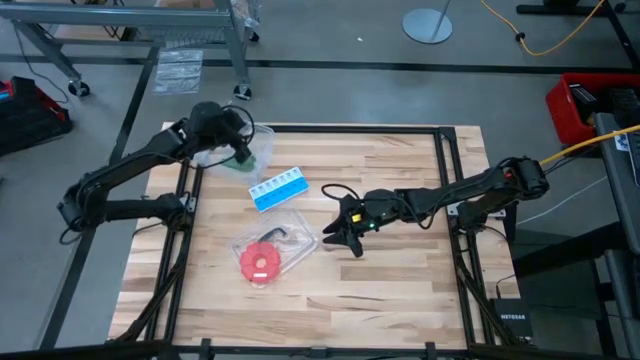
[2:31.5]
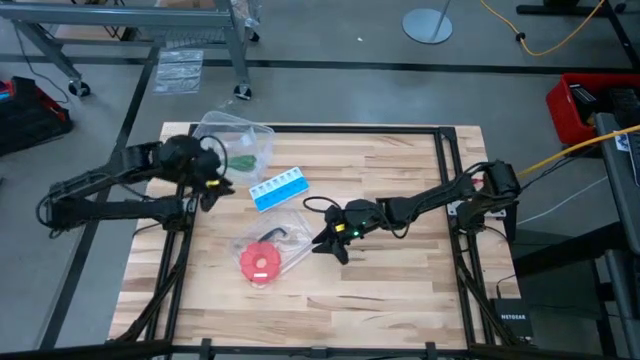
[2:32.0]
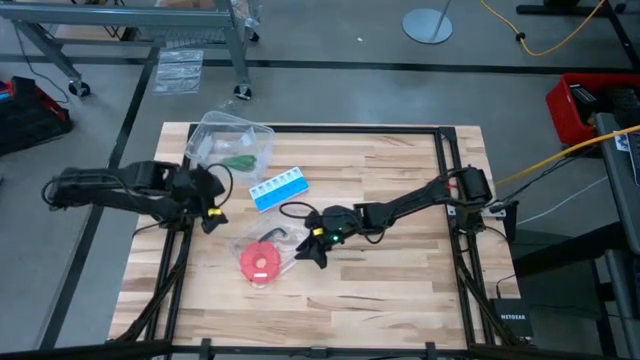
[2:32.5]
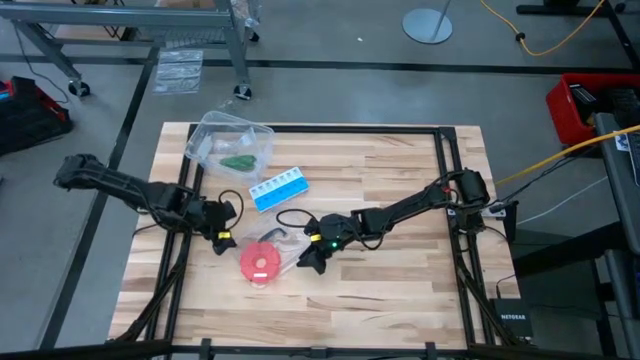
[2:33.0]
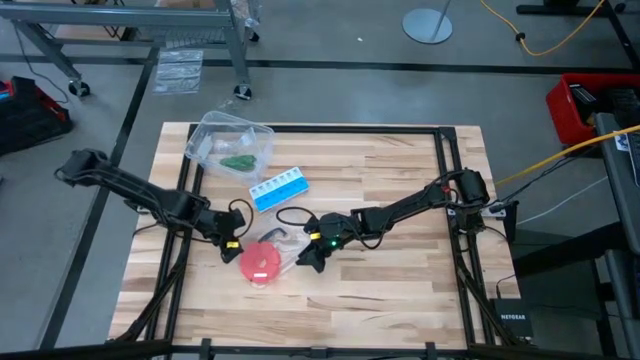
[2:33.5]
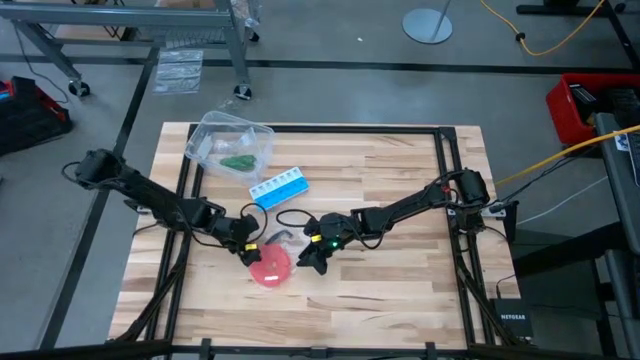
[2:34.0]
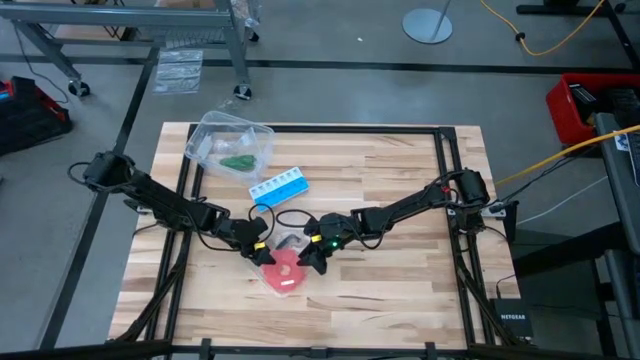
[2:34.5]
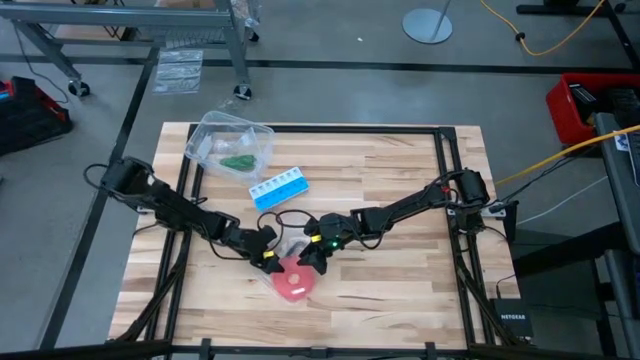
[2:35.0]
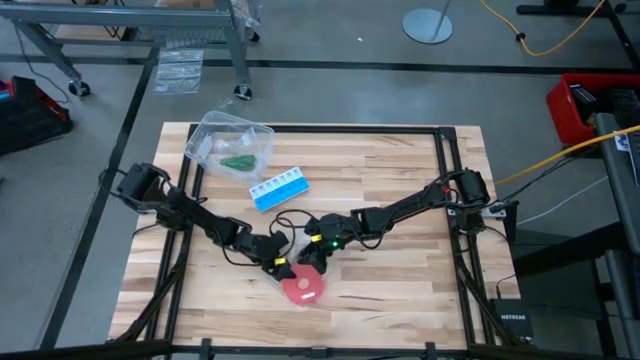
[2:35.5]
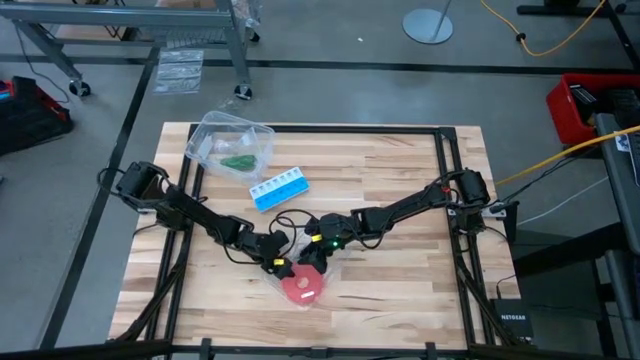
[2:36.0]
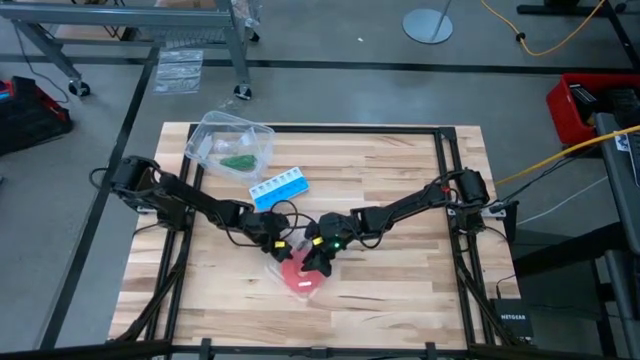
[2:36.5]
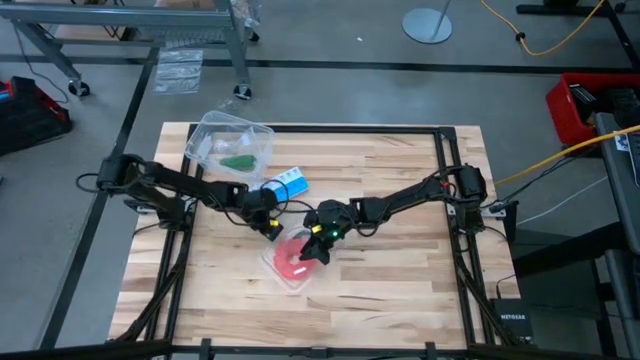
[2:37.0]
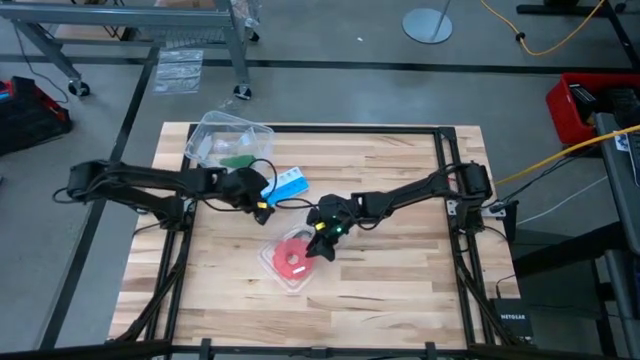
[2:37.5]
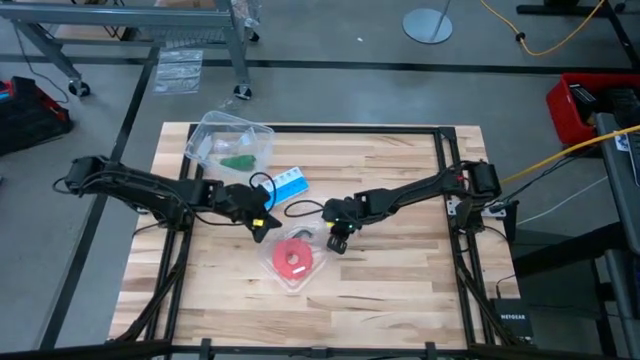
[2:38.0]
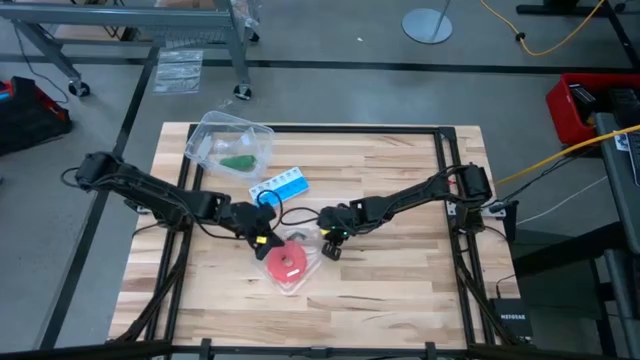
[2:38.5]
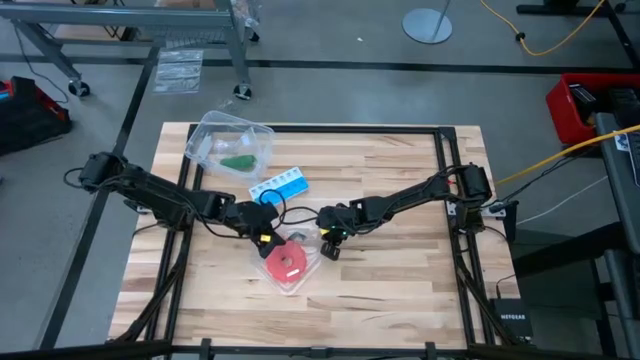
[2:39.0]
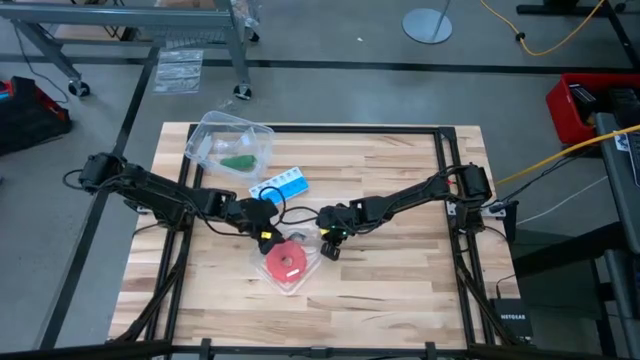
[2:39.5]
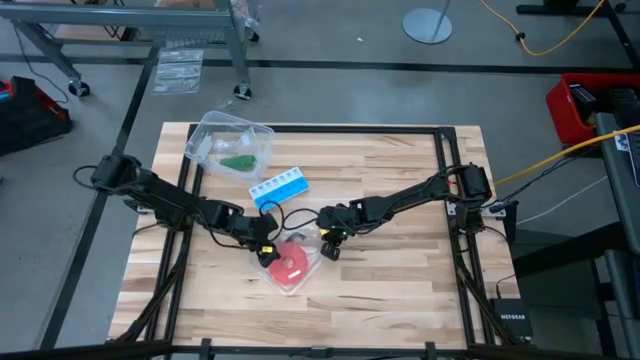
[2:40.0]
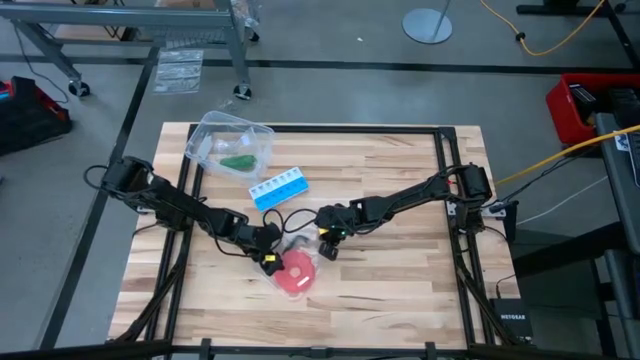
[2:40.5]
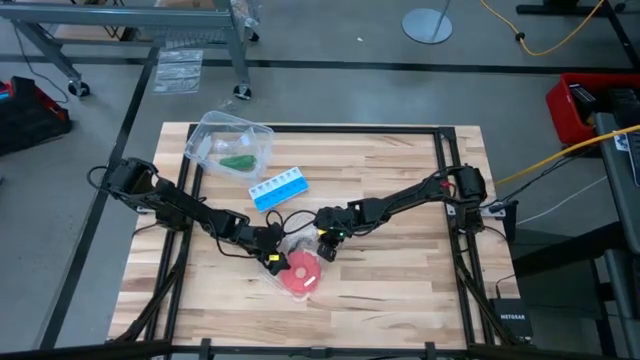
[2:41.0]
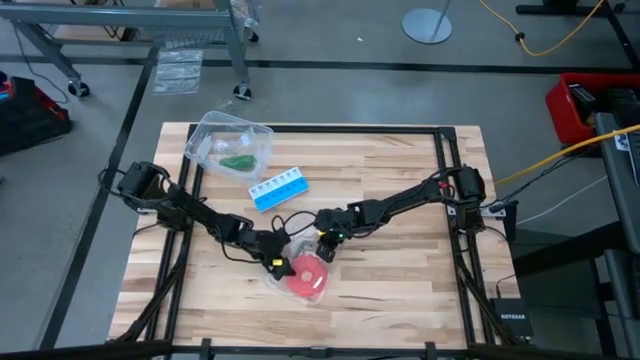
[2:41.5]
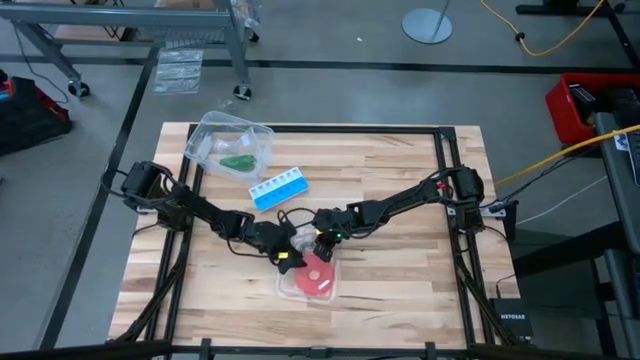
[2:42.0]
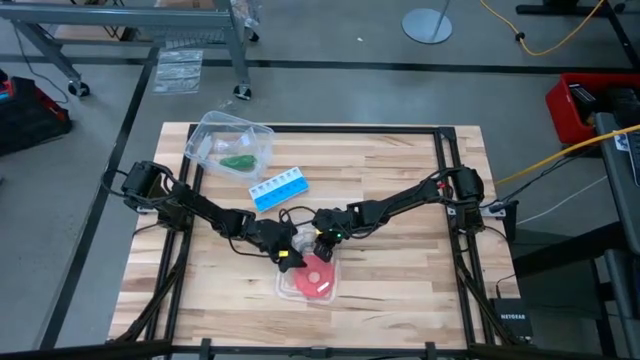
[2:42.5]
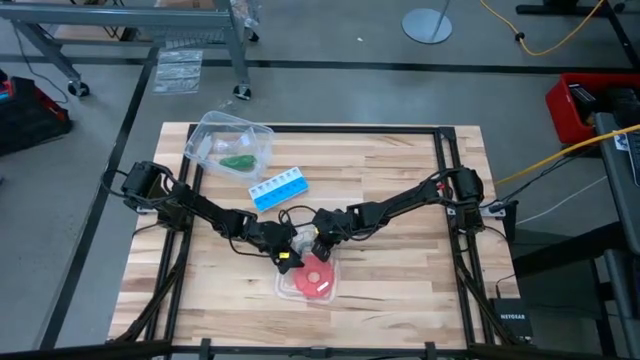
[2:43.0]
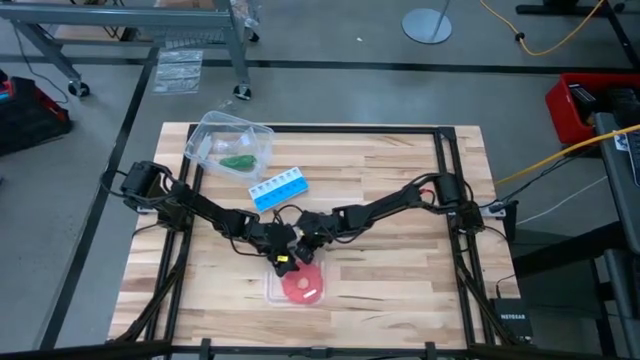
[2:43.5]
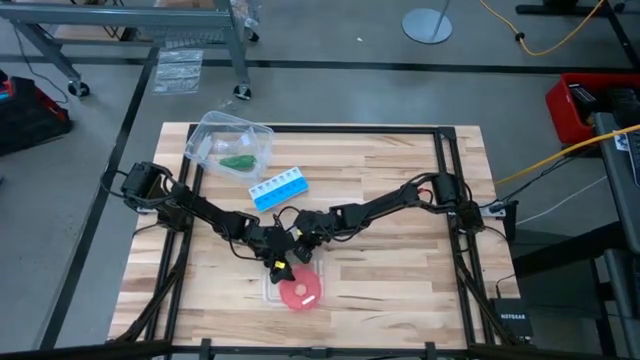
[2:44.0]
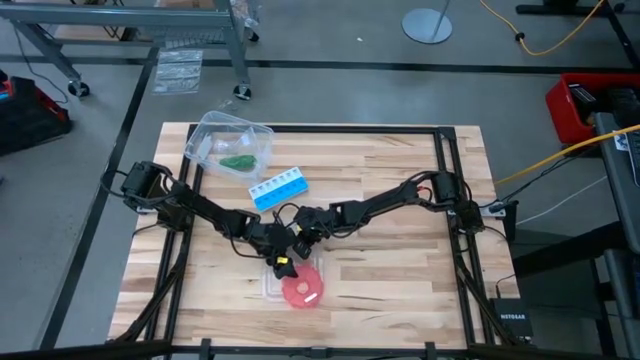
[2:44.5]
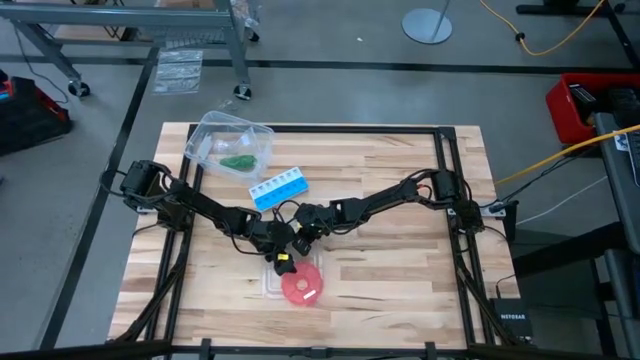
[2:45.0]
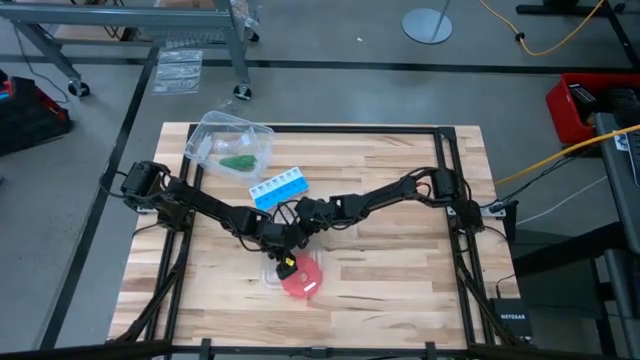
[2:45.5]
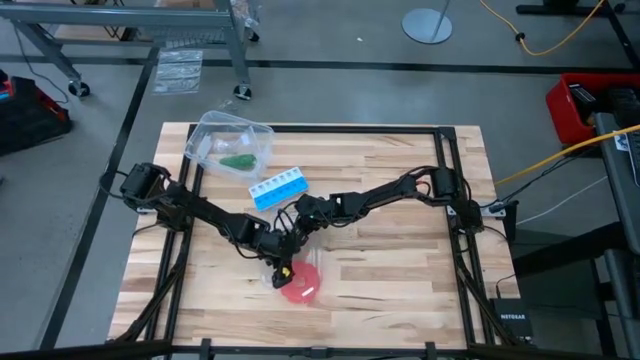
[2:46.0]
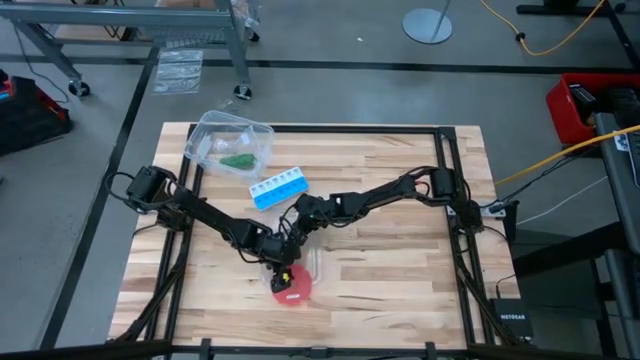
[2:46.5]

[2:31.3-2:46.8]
Task: Roll bandage
Remove the pill organizer from the lid

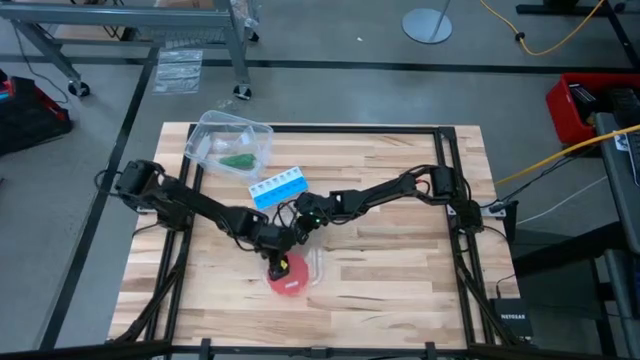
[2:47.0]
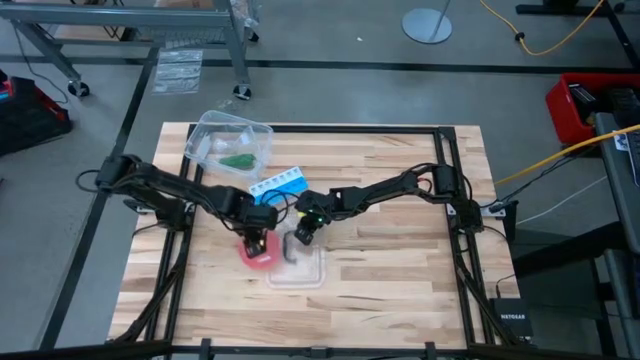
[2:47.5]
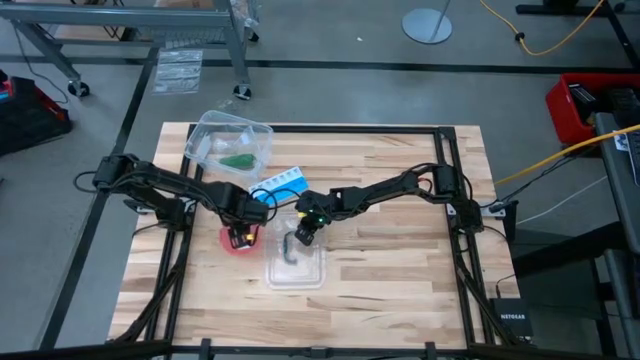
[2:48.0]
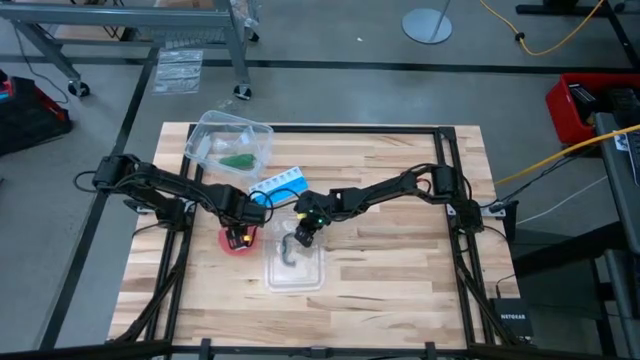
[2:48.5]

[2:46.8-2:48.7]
Remove the pill organizer from the lid

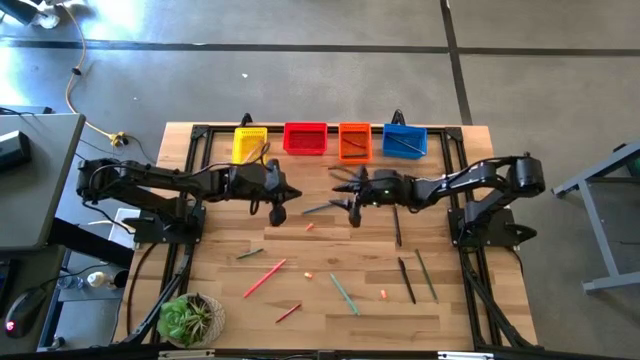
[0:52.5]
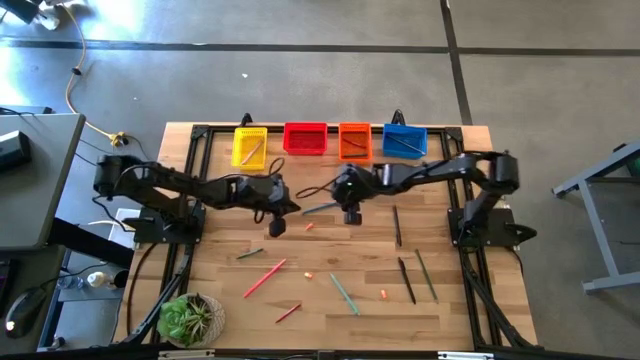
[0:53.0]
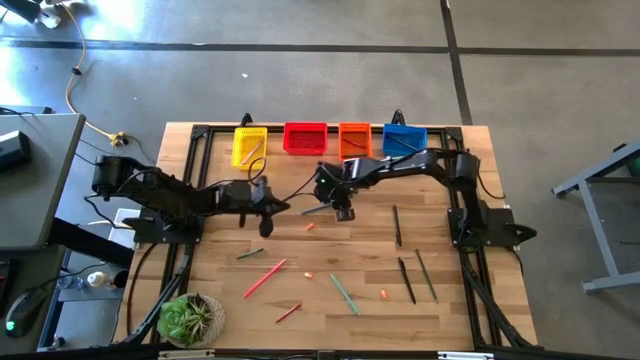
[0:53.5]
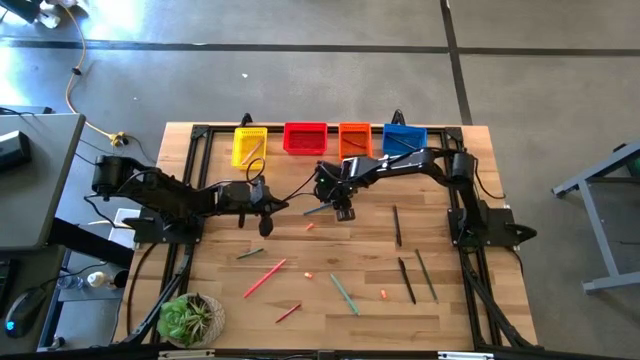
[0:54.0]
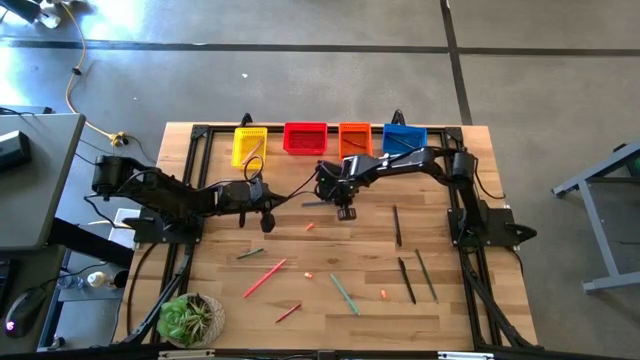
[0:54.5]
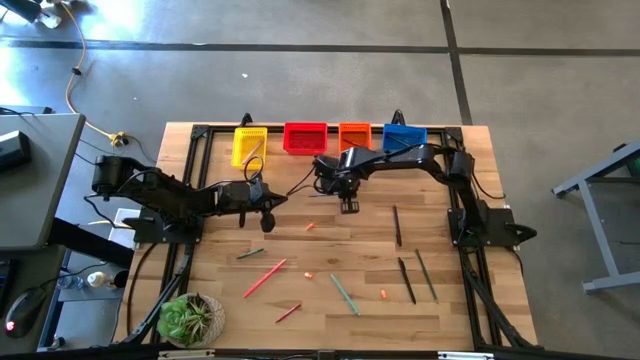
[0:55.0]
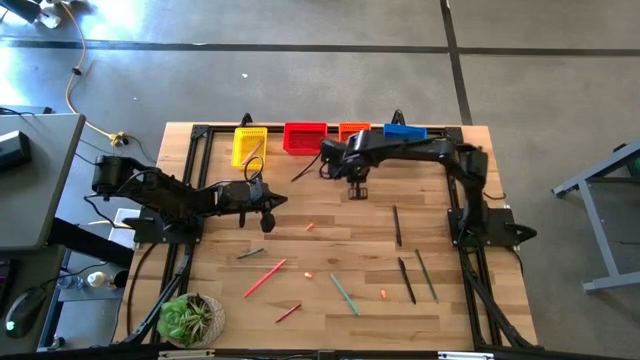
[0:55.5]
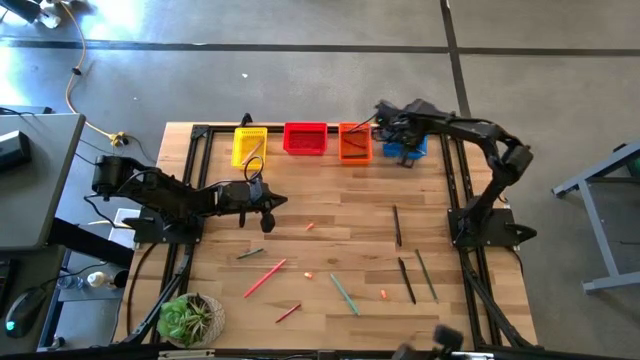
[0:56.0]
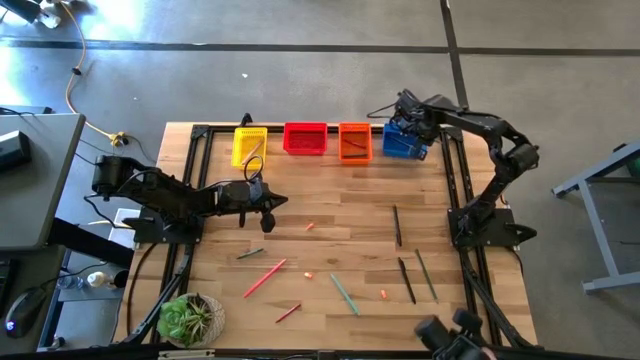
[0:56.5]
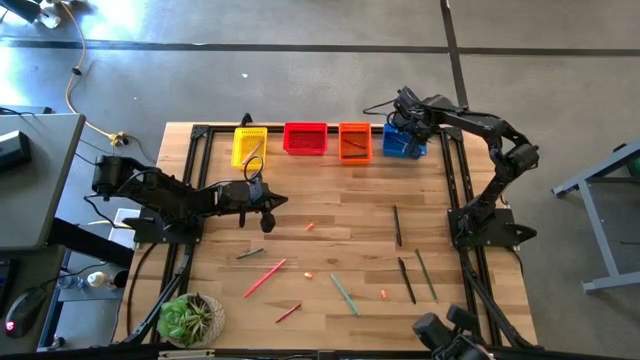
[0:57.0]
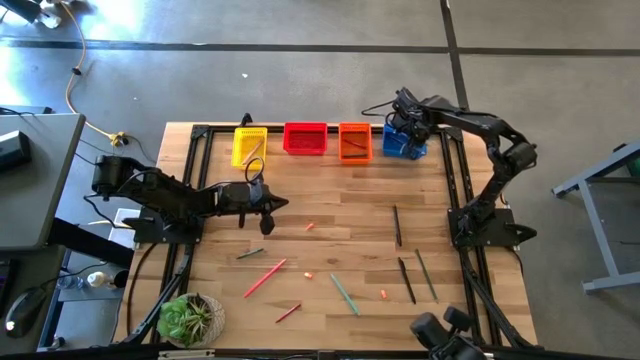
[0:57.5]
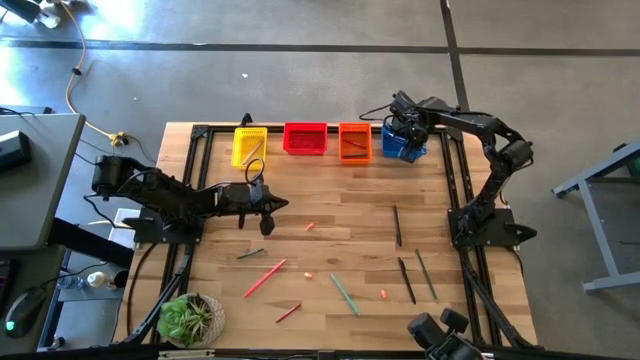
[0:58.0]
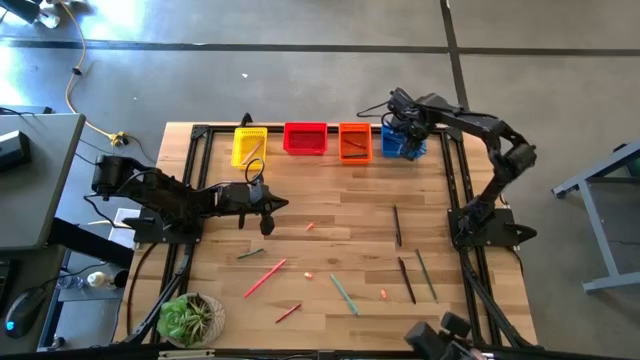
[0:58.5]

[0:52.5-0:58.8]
Task: Sort crayons/erasers/pens/pencils in bins
Put the blue pencil into the blue basket
